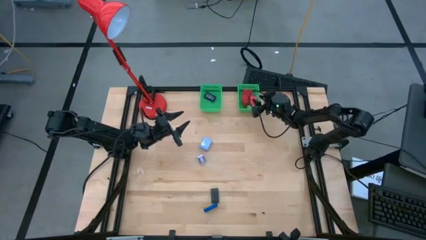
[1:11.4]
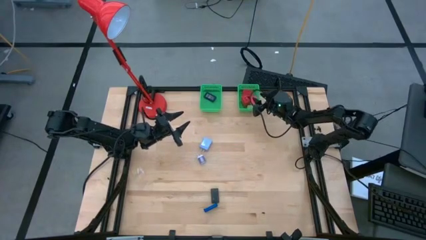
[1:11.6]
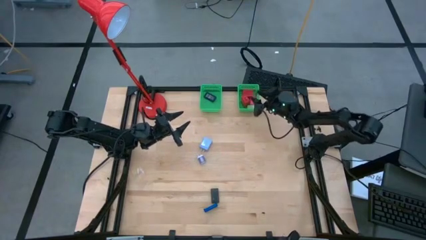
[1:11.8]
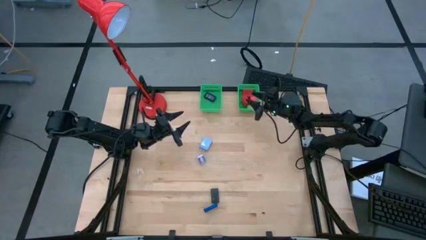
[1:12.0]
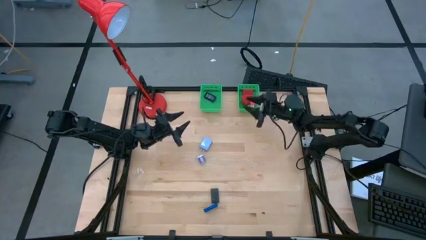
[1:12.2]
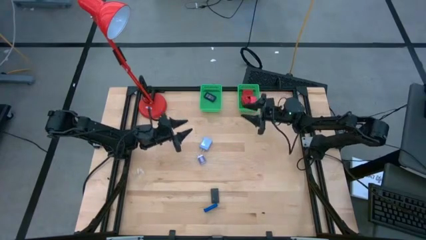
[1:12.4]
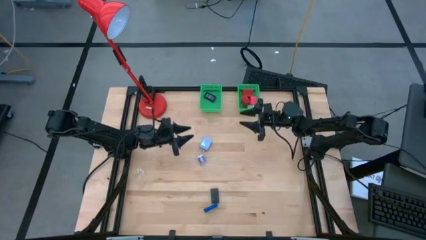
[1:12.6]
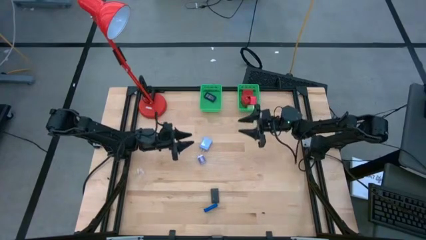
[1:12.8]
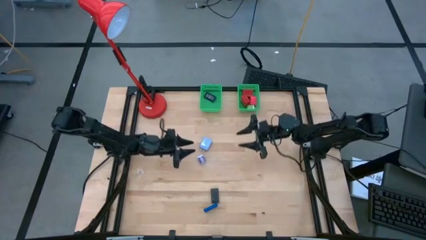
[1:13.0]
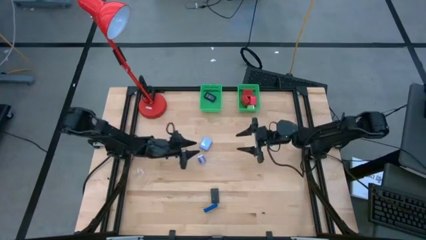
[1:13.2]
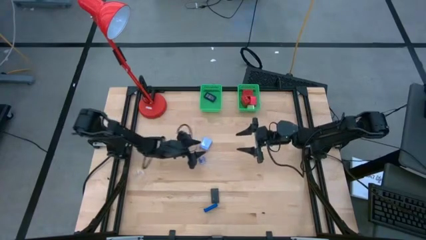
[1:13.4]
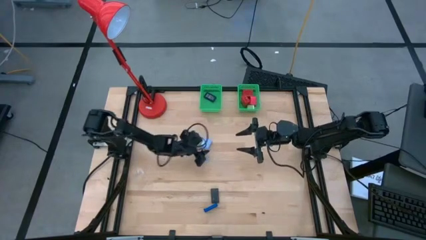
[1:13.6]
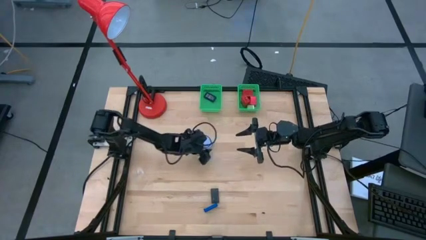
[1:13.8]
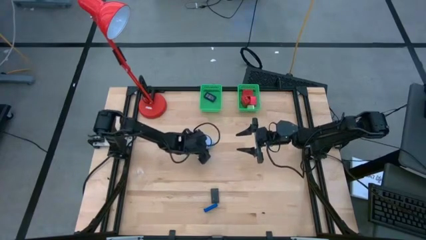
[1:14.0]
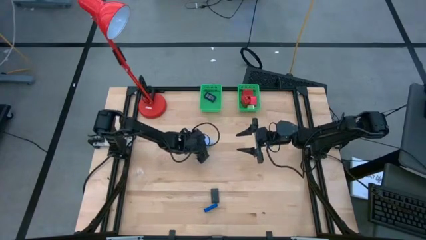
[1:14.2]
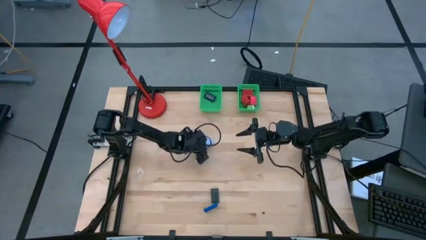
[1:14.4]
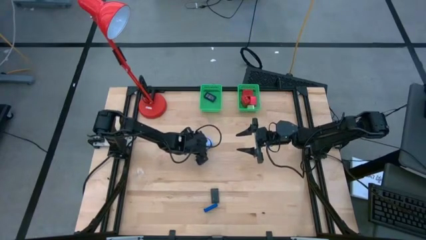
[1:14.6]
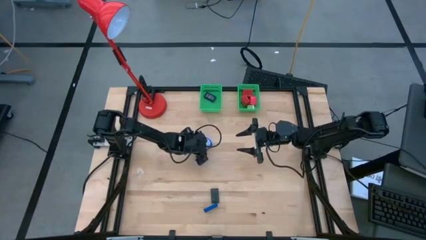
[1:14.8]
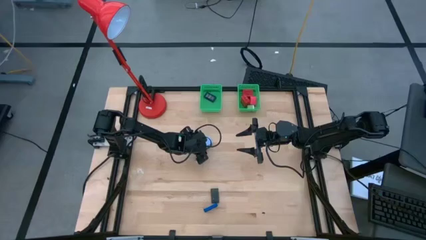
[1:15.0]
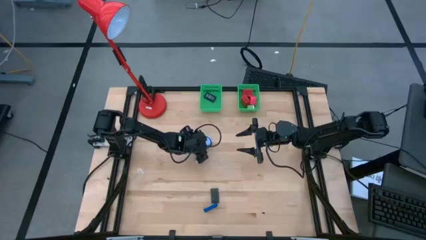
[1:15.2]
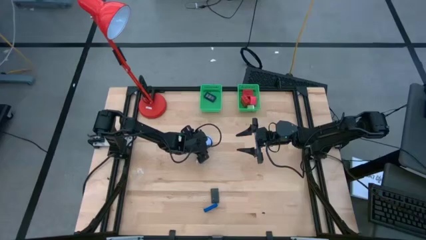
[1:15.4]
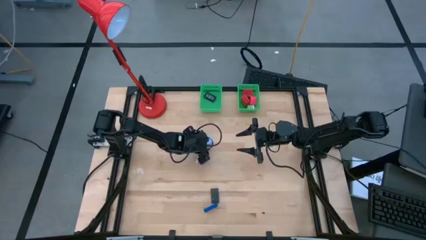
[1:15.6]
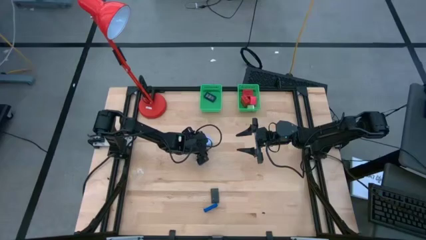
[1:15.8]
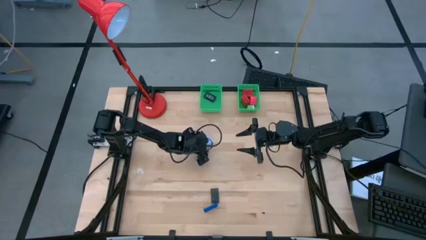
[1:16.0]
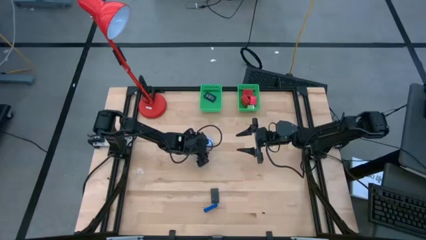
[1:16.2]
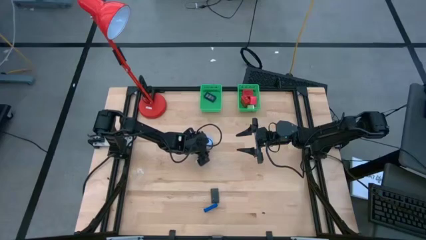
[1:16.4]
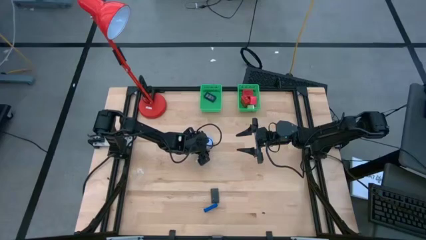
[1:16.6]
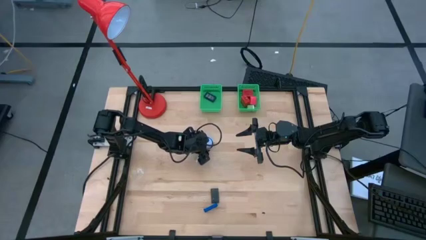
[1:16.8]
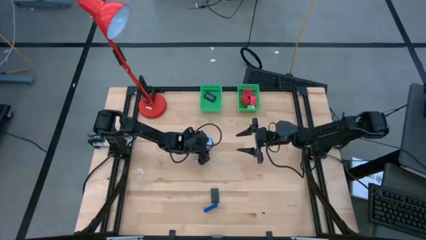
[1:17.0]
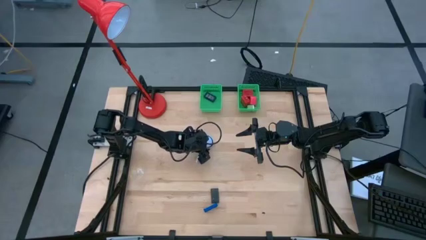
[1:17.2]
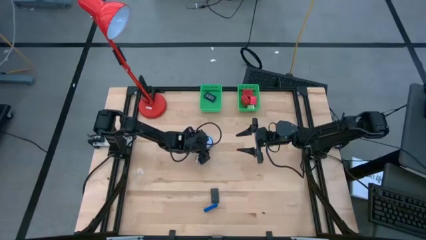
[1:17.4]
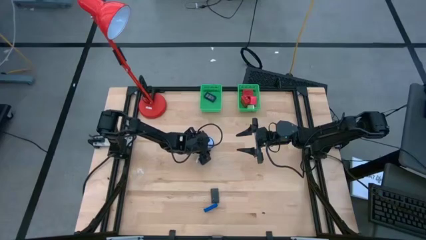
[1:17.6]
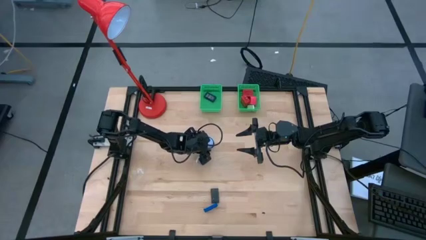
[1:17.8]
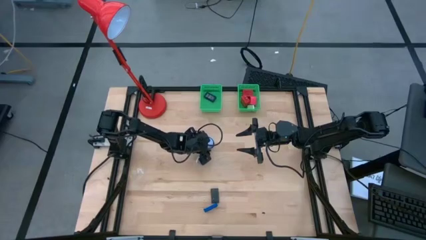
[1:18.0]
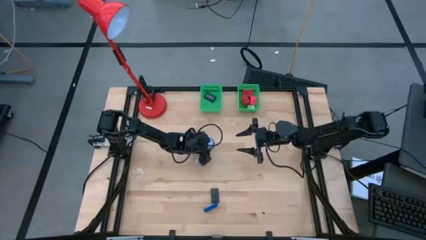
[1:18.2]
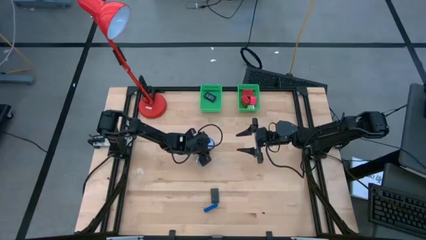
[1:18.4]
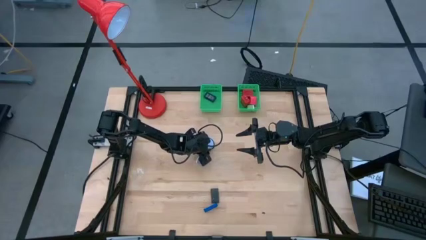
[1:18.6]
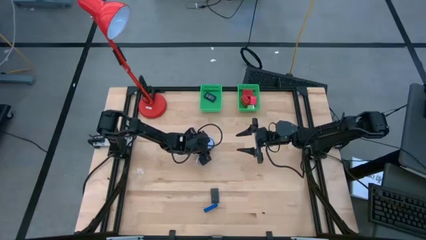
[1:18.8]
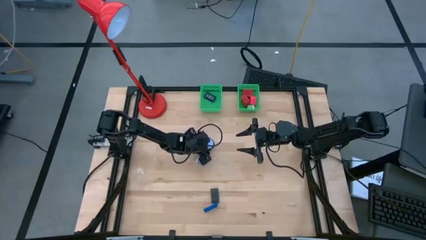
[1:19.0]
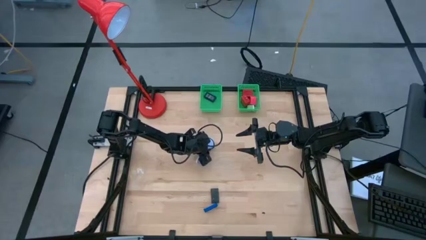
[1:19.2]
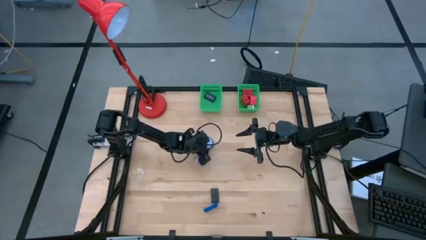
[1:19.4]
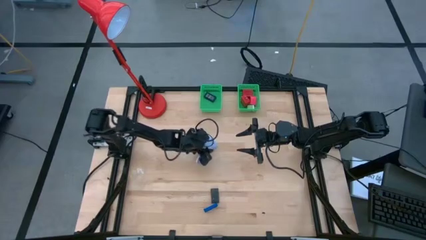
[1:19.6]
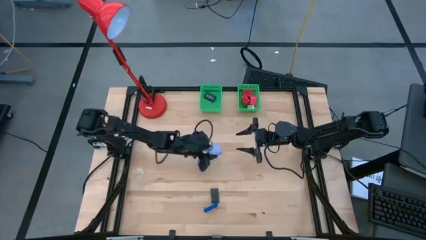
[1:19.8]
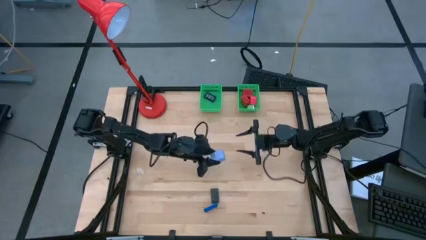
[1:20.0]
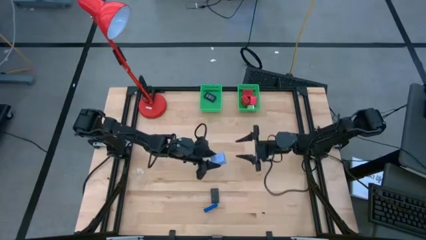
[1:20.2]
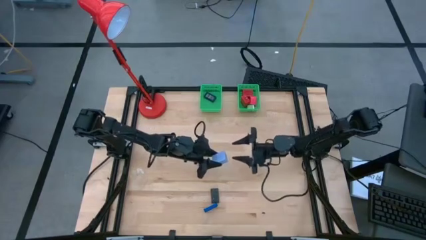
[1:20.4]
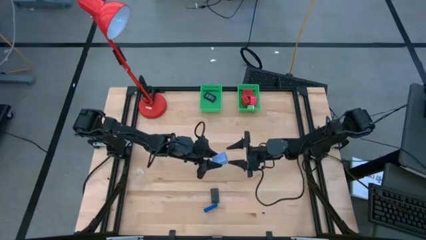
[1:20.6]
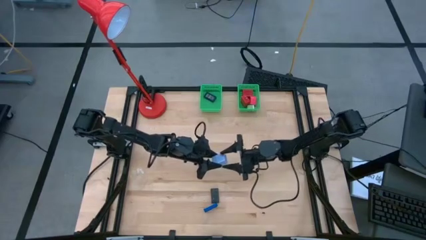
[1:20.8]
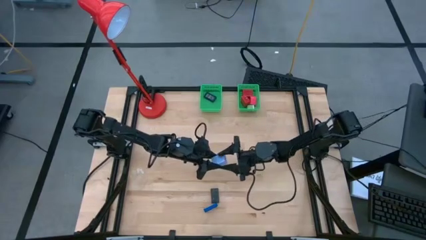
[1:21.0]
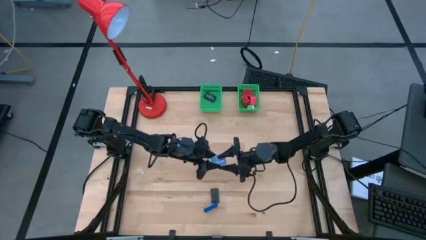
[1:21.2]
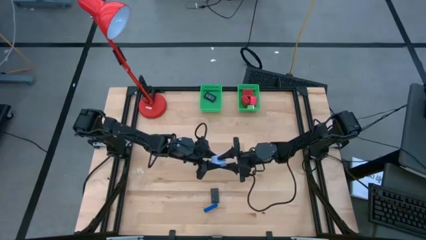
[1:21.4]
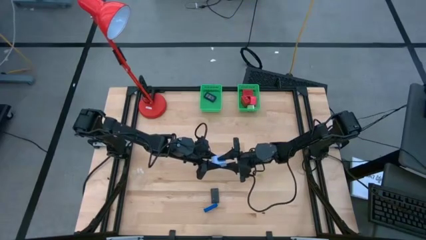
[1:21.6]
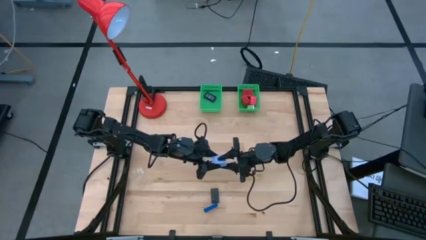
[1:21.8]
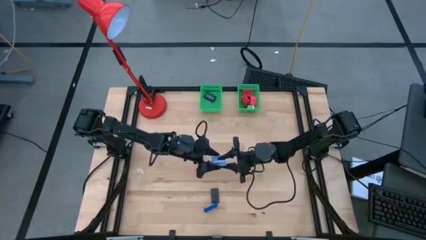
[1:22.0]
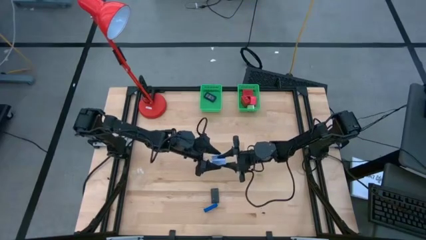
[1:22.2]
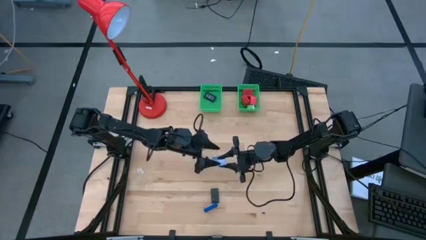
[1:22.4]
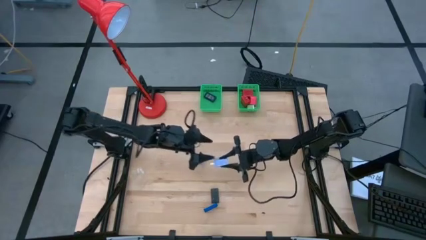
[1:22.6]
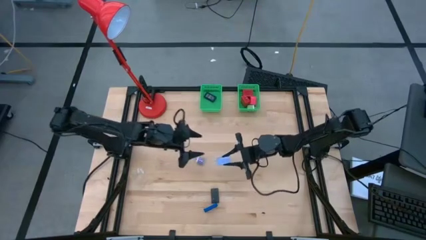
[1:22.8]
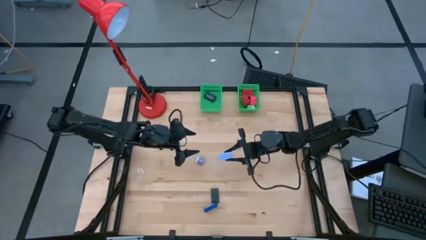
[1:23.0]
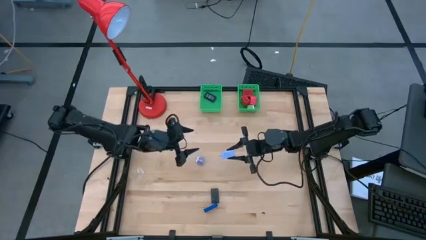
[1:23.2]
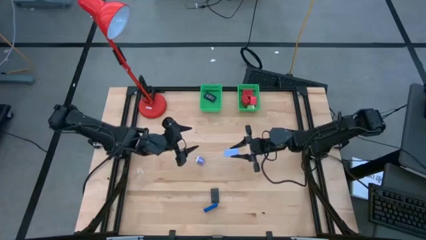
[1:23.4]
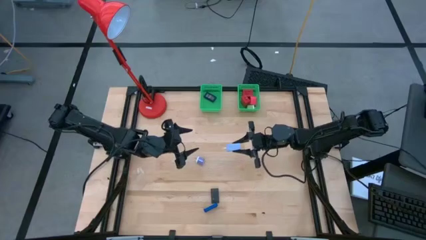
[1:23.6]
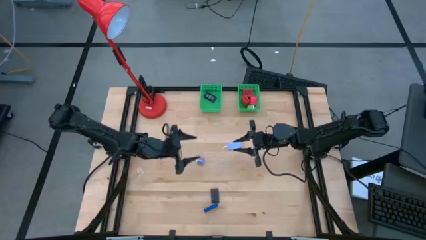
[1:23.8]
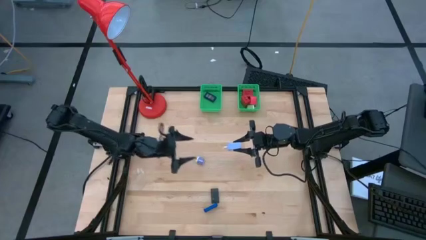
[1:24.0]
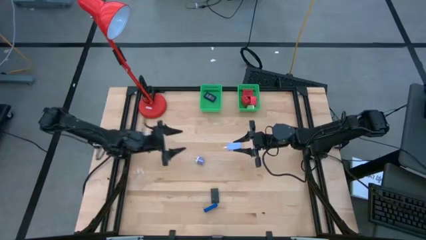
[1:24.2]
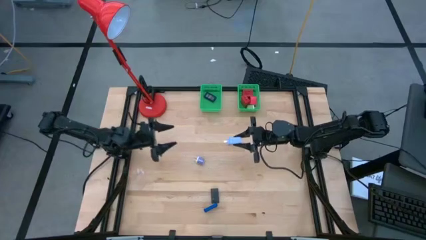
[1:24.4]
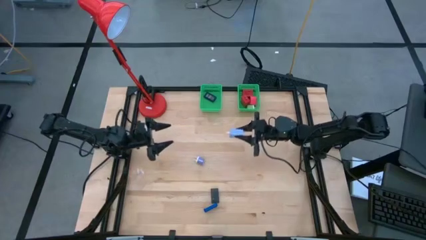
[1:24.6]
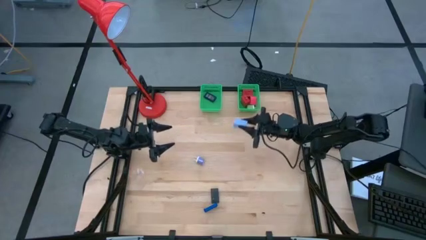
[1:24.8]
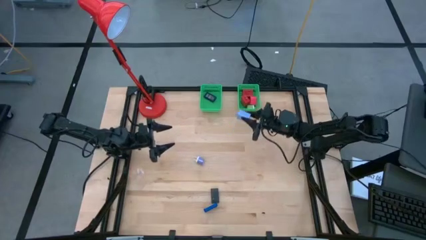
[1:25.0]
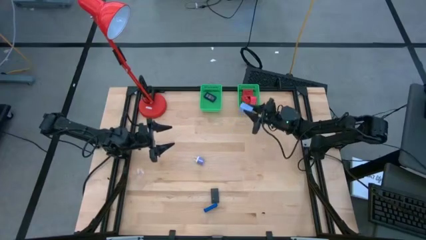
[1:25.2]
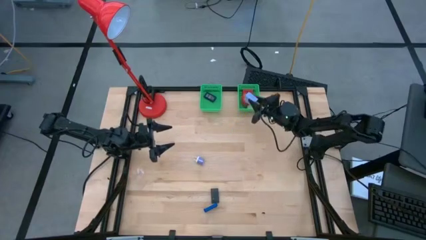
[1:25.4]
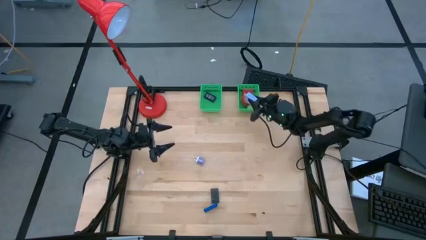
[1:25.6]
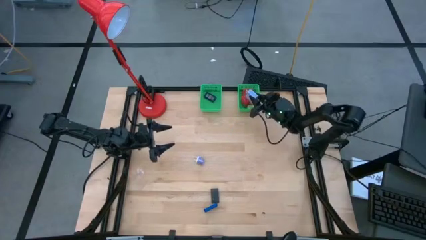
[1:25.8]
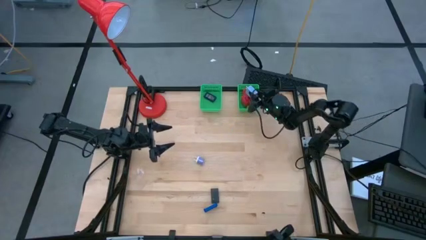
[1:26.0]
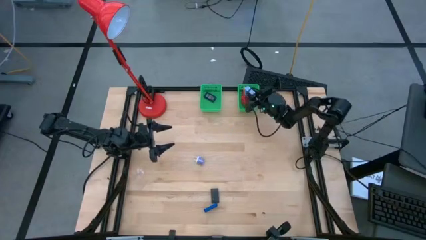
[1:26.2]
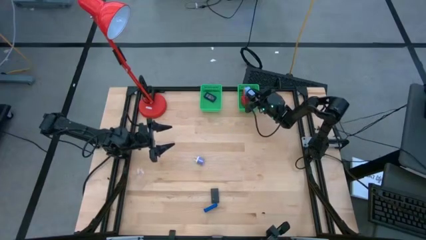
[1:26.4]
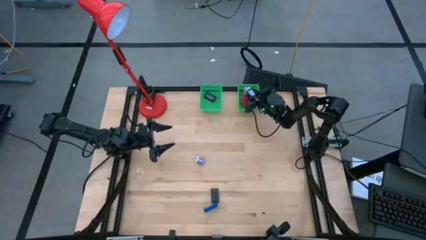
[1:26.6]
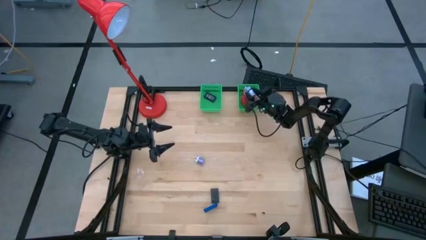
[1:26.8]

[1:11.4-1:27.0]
Task: Pick & Place Office items
Put the light blue adapter into the right green basket

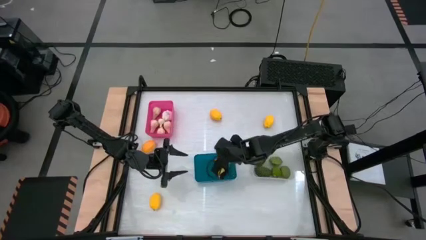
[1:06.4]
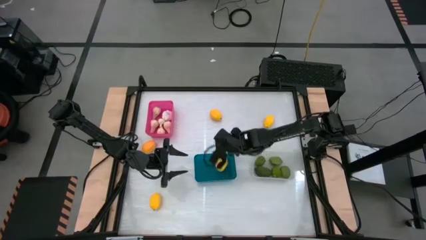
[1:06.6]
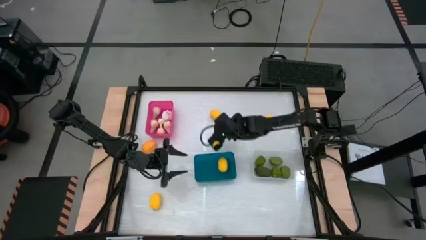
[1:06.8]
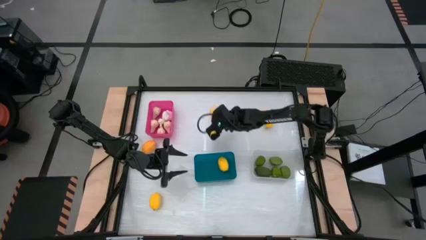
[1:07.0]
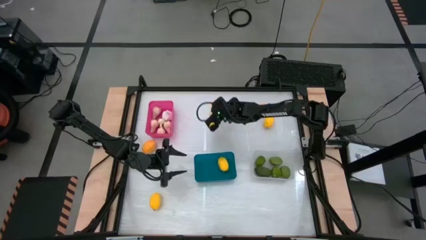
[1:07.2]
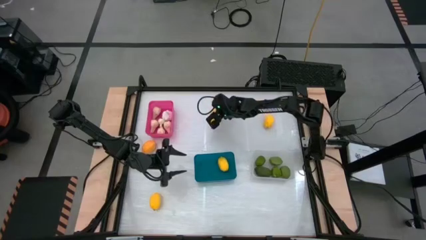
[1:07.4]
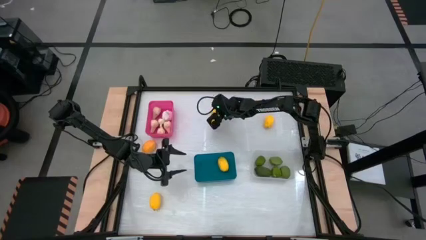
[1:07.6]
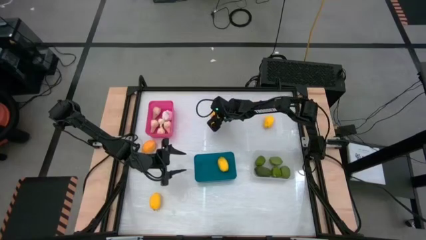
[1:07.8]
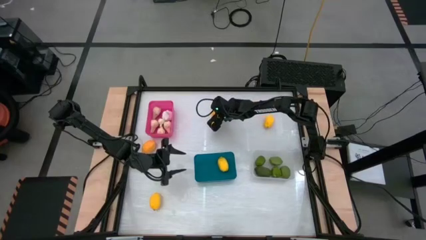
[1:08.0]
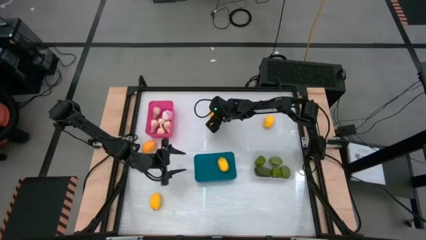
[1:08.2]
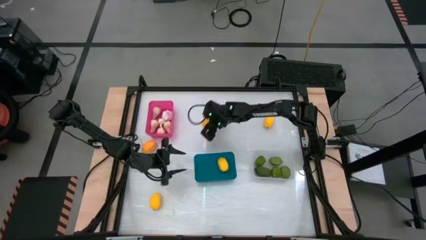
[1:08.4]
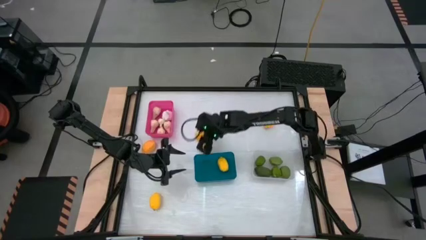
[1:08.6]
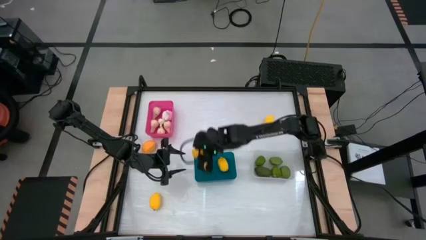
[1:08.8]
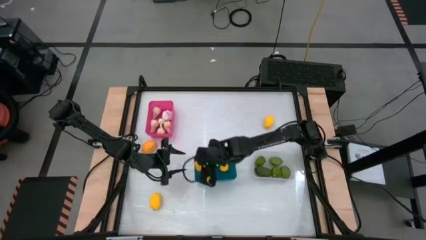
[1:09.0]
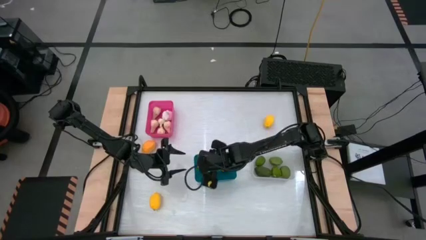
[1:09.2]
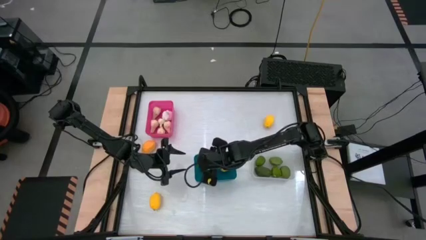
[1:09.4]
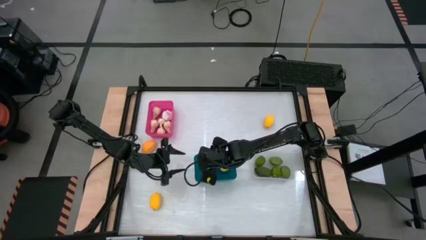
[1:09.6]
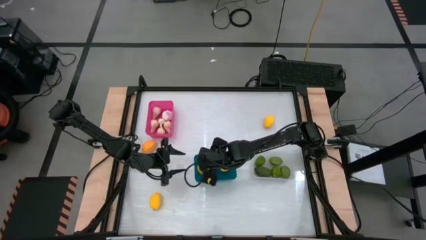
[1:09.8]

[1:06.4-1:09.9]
Task: Sort produce into baskets
Put the yellow lemon into the blue bin
